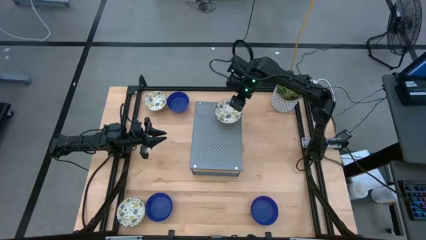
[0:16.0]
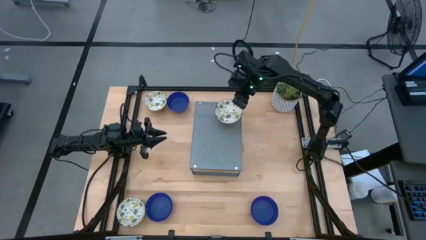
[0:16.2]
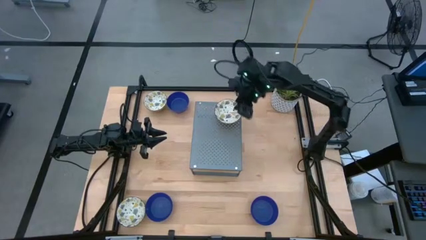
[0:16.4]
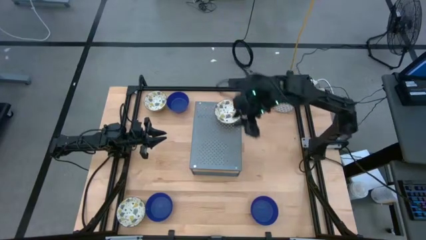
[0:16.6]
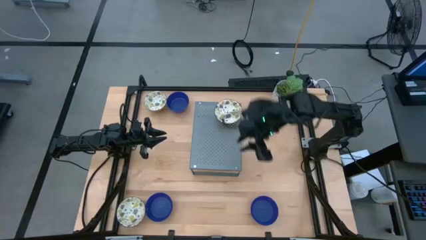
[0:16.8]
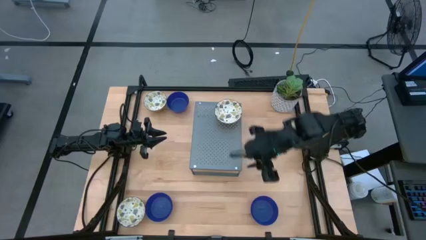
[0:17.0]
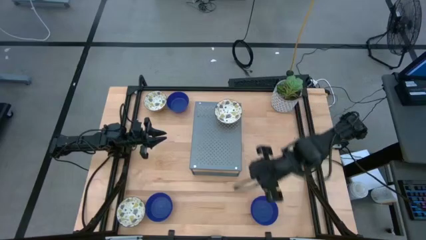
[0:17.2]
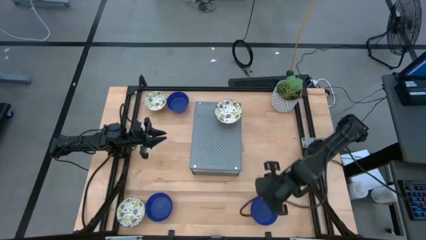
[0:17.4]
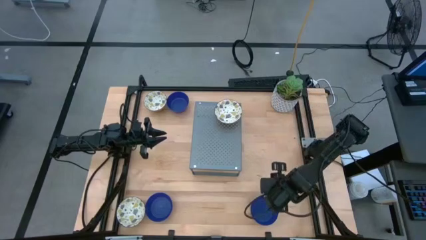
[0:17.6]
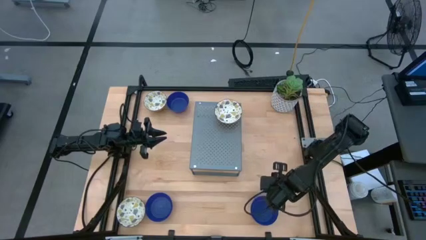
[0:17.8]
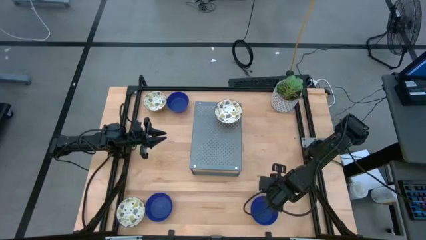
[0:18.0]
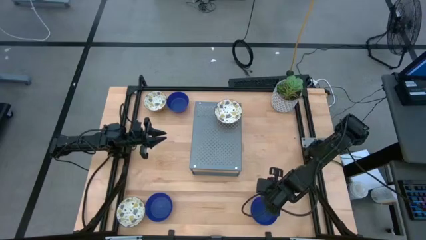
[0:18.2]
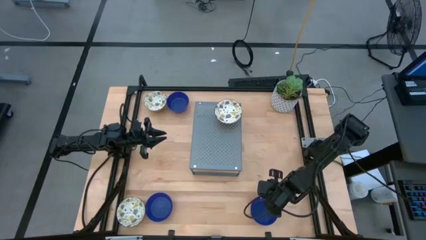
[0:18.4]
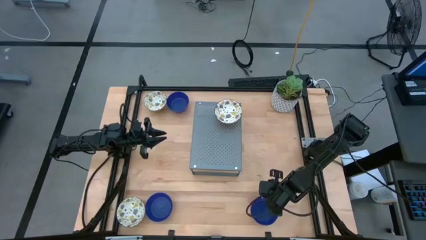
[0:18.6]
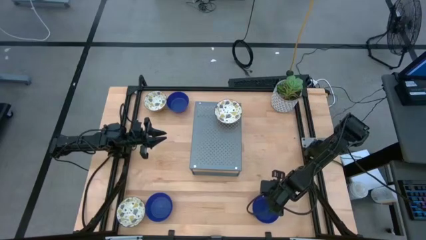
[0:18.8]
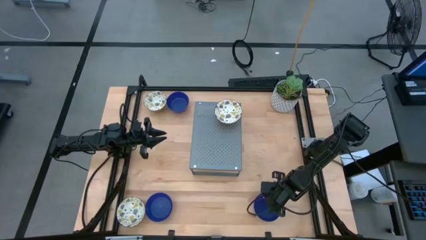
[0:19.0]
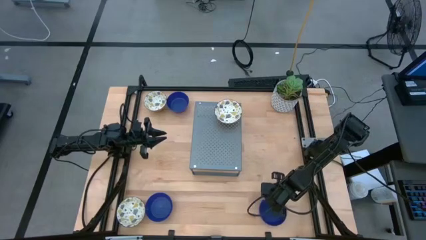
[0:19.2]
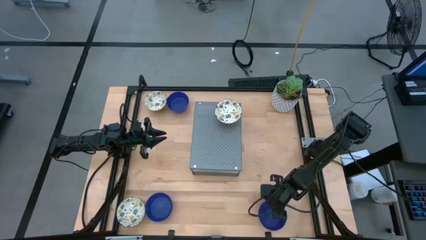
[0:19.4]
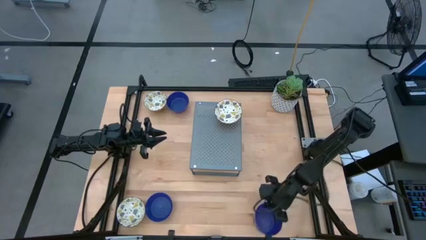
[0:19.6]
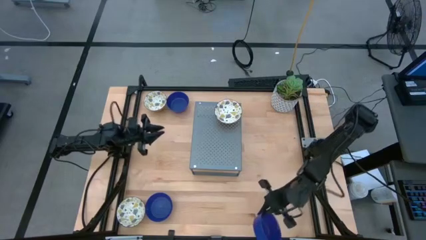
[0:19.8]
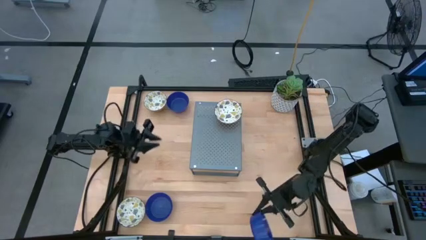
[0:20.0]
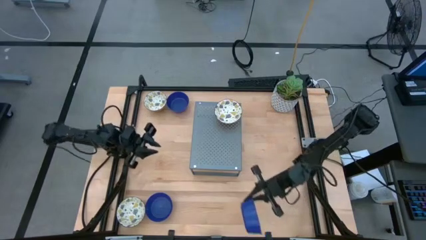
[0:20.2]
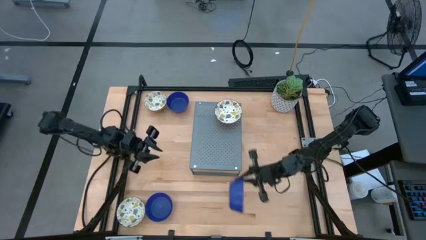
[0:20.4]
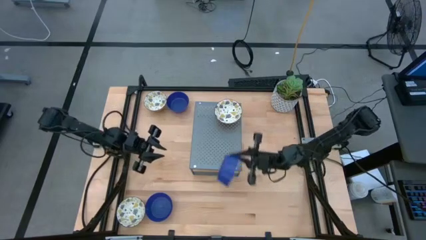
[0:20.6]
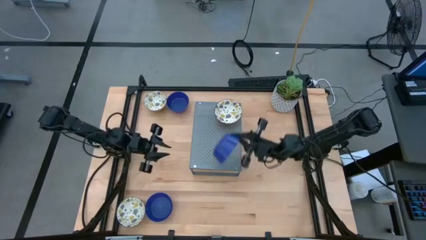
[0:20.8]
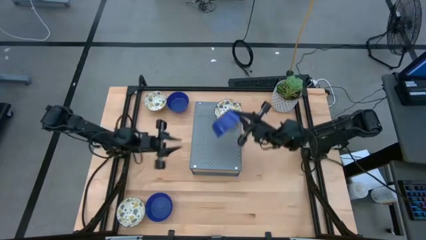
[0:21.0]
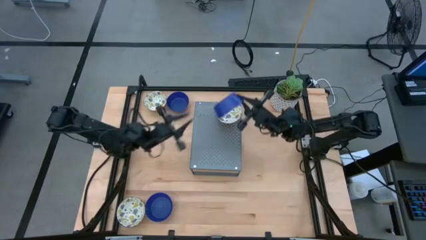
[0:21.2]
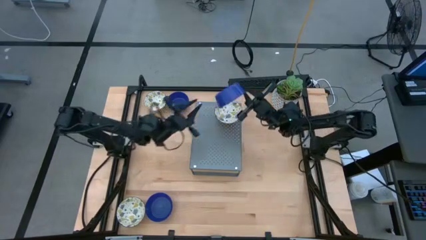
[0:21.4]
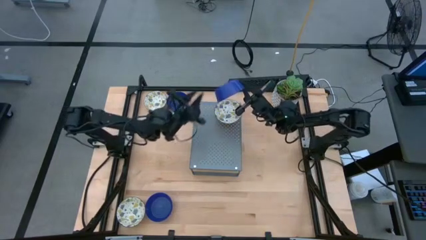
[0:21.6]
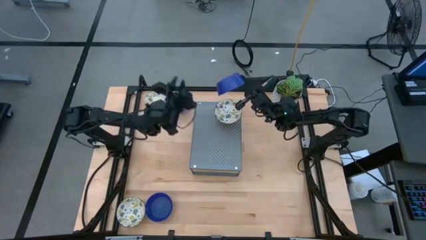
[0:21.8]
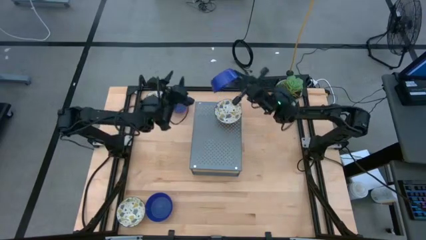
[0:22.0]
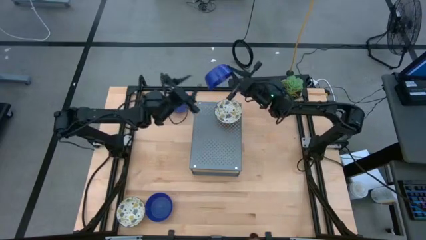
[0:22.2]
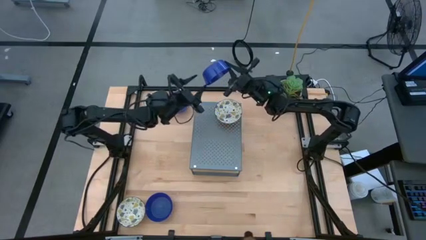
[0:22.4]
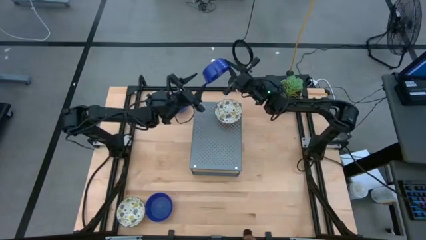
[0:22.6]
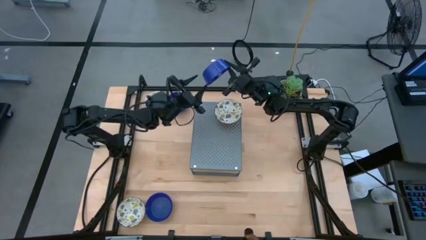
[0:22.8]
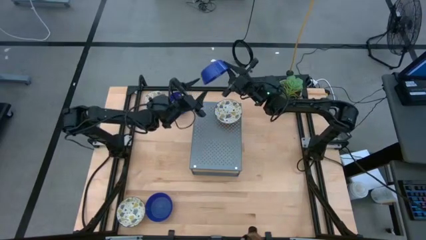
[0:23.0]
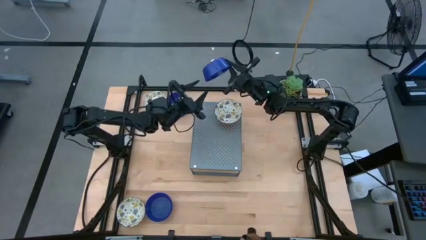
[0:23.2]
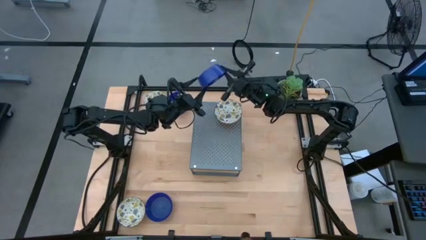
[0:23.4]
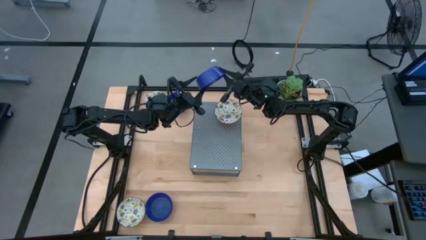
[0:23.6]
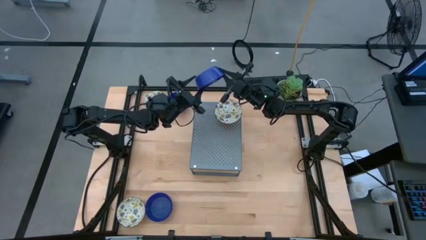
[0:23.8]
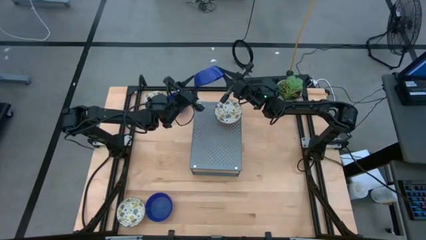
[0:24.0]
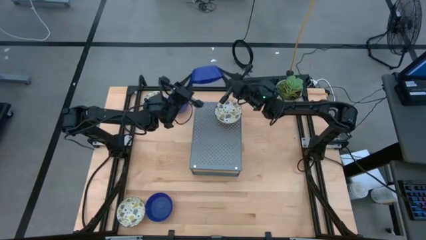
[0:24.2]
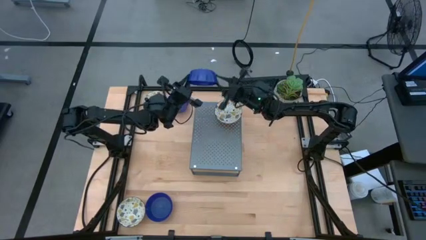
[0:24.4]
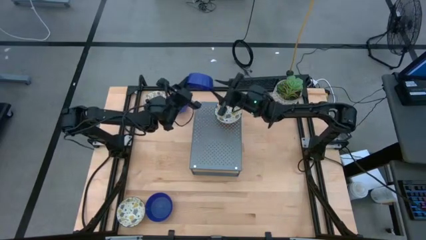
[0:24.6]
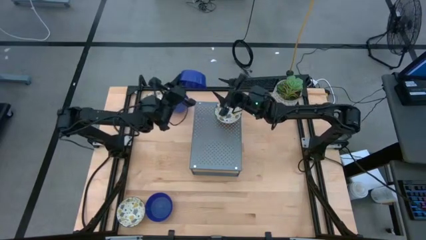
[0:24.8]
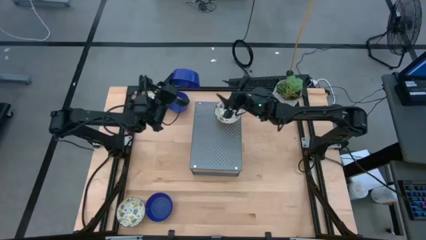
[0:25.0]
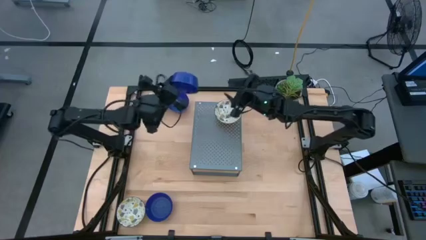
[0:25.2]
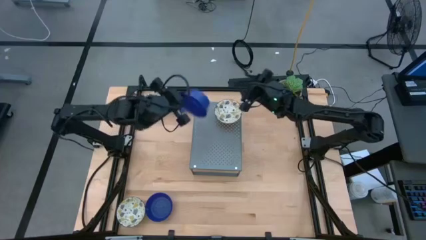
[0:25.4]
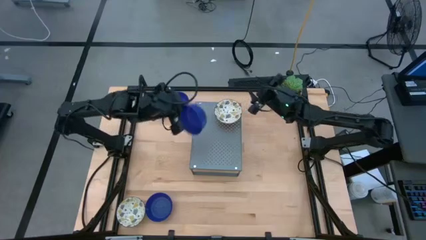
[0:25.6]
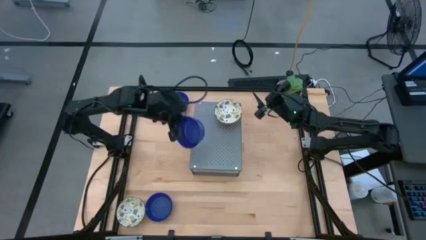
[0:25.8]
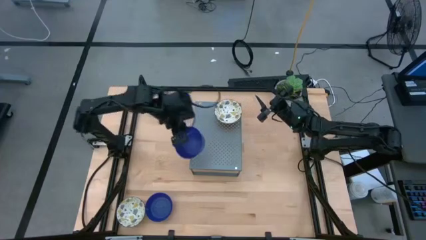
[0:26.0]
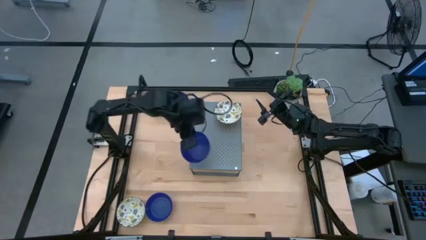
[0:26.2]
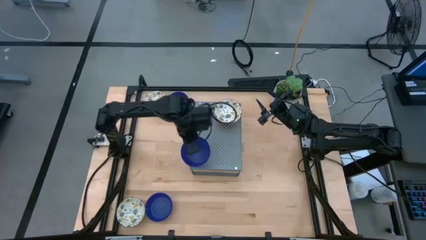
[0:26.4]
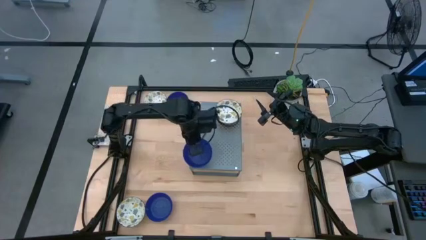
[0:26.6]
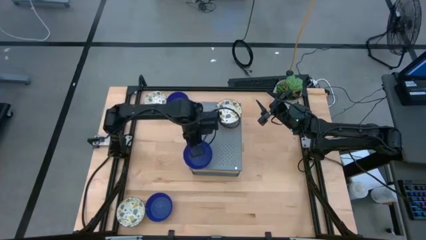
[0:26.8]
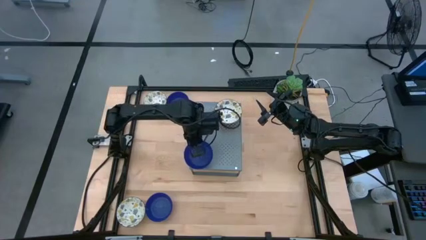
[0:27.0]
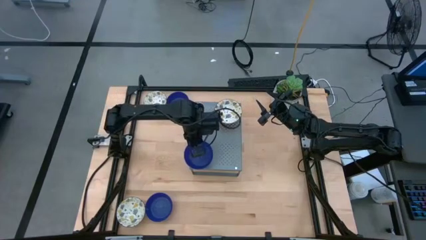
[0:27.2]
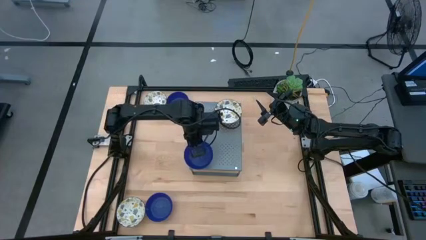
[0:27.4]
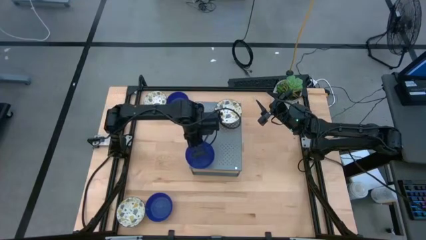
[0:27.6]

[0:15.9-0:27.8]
Task: Pick & Place Mini bowls
Put the bottom right blue bowl on the shelf

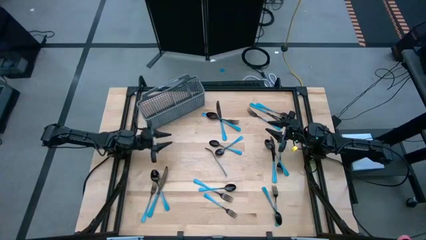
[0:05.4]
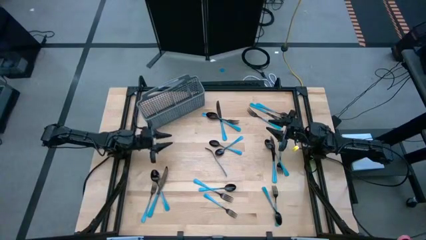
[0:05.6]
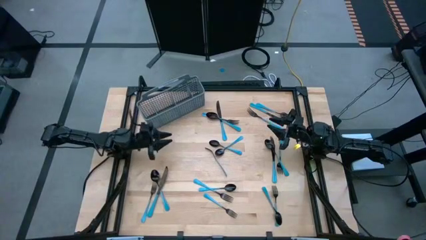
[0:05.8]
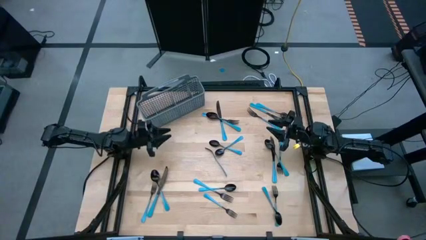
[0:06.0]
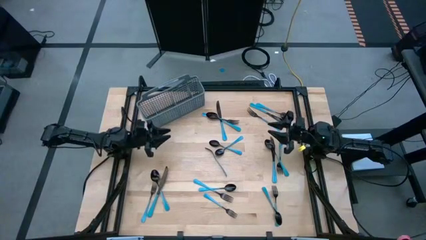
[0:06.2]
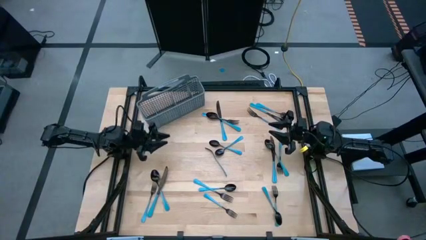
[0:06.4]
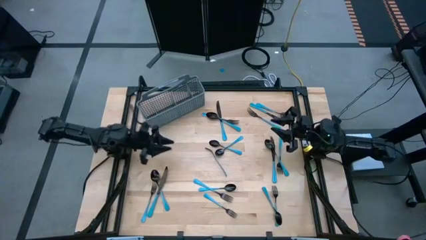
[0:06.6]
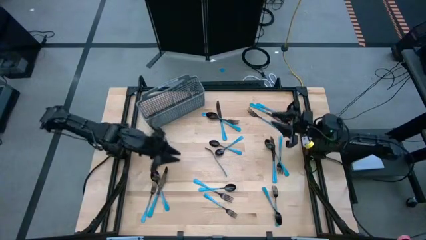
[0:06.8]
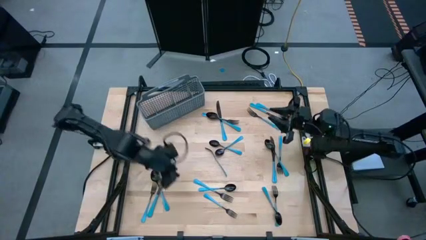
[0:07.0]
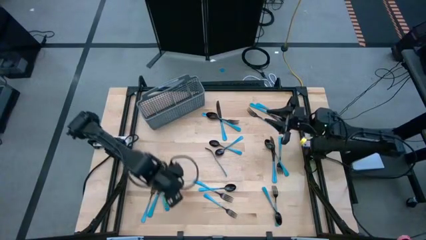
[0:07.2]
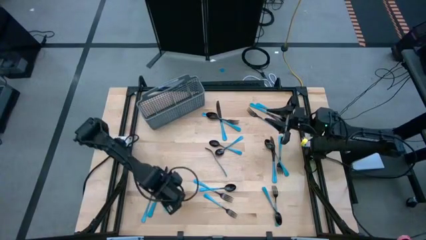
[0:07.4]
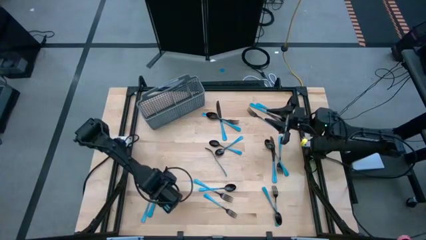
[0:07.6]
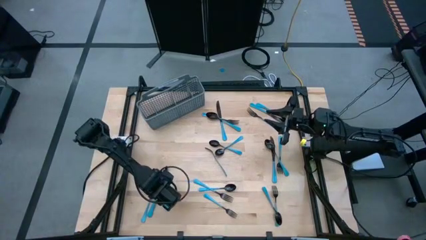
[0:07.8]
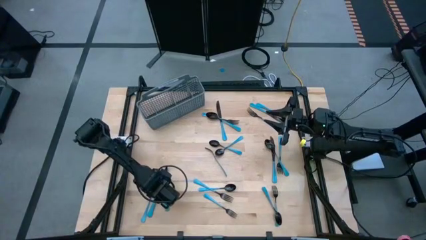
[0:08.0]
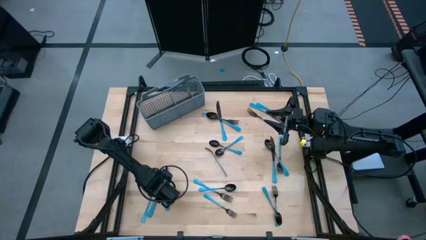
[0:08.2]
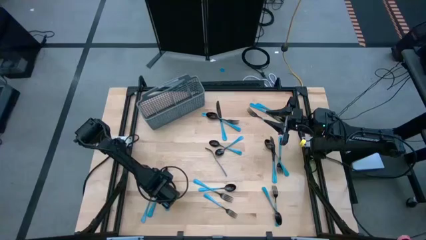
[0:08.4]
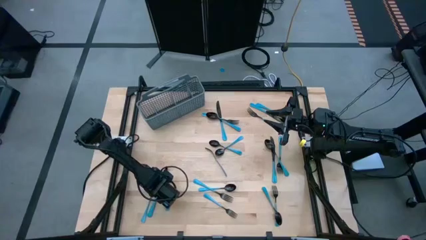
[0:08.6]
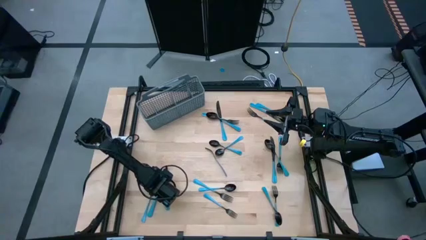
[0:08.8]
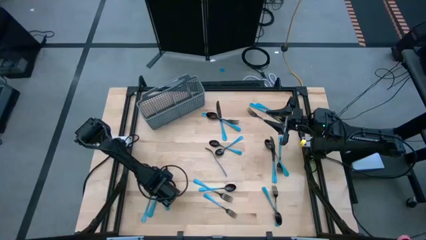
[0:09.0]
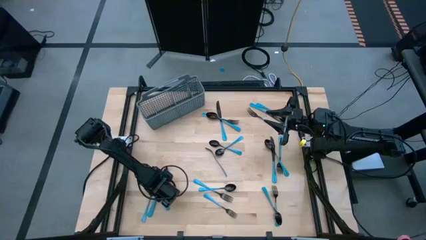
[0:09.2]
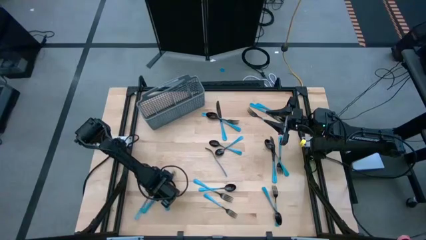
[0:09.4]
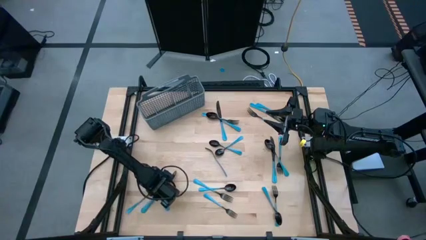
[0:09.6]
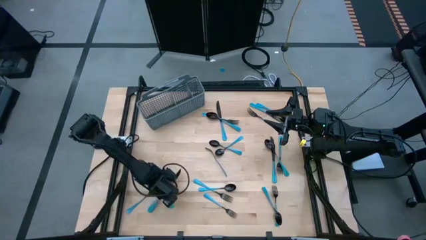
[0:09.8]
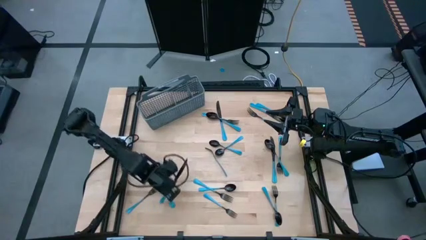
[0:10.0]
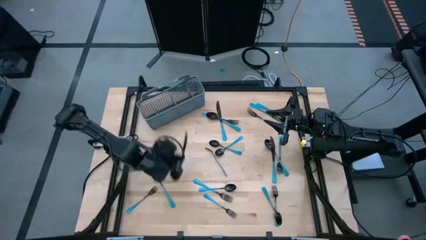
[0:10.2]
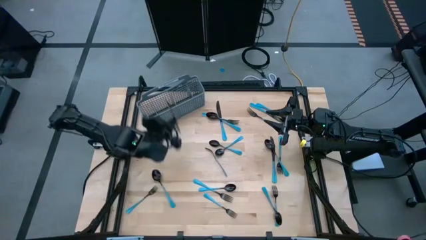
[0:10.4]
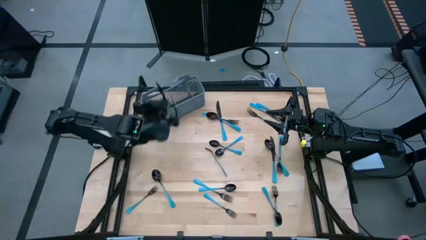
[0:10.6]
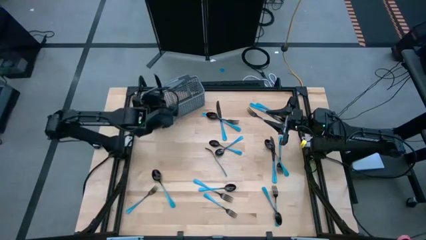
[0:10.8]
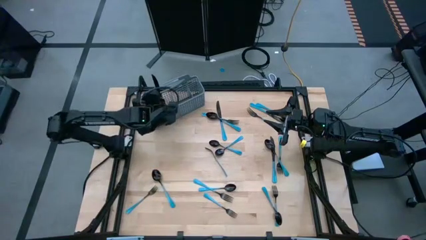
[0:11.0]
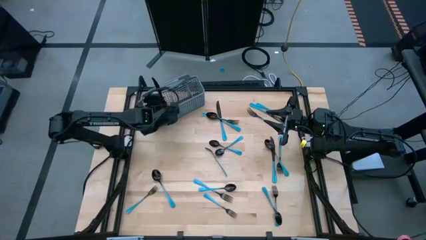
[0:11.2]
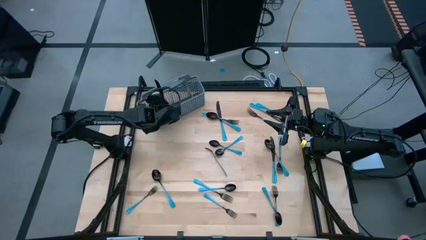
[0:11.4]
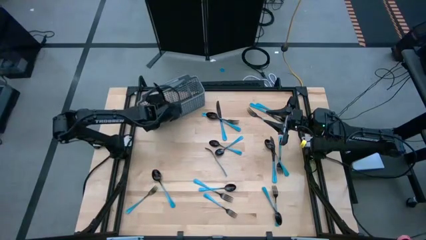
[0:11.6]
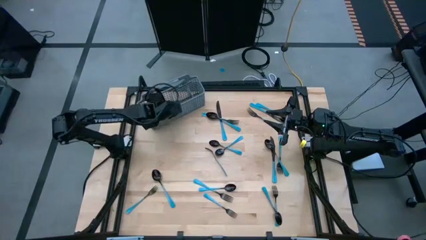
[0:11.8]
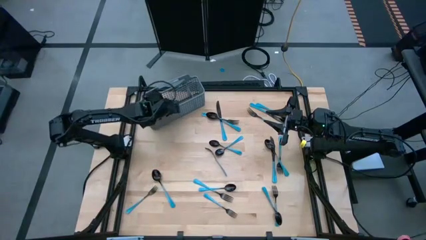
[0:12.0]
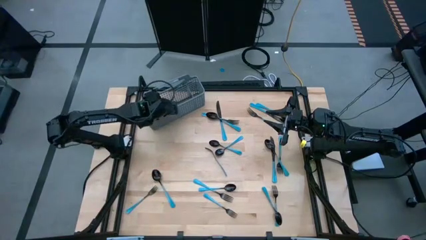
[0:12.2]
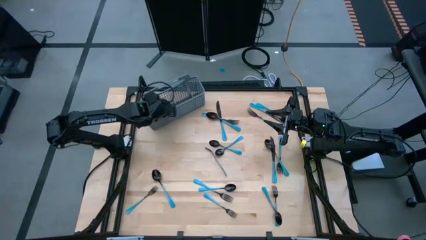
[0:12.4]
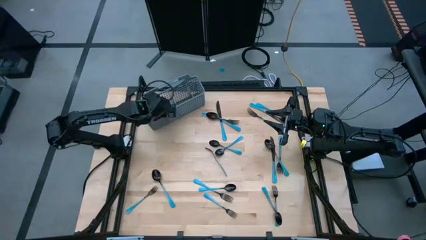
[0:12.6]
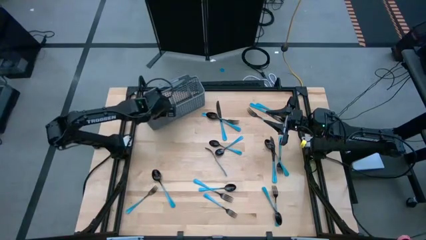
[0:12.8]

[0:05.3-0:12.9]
Task: Sort silverware
Put the blue knife into the silverware rack
